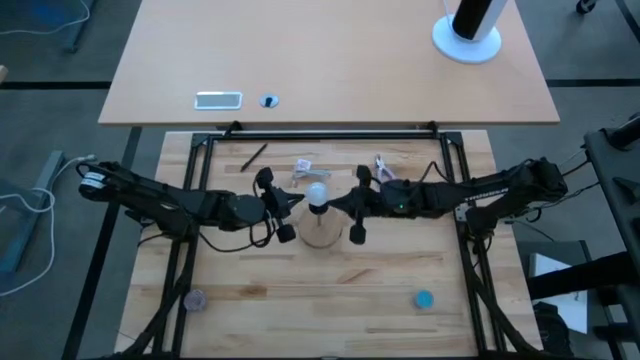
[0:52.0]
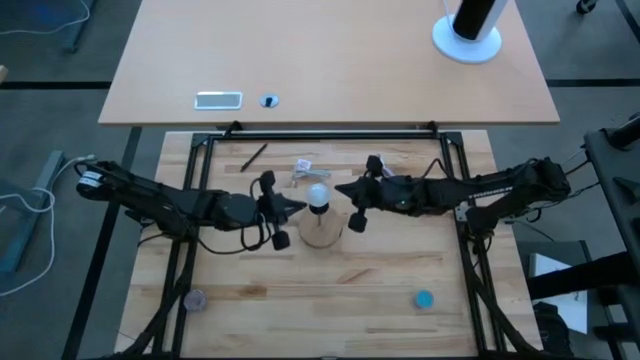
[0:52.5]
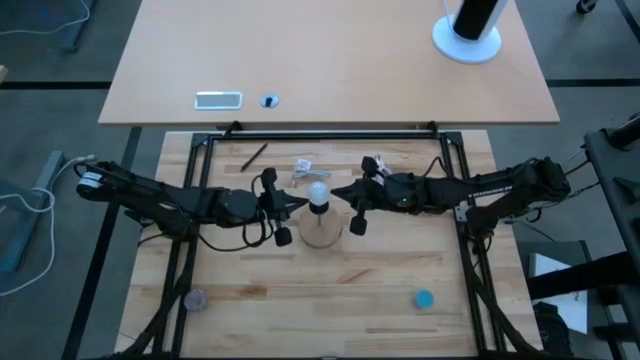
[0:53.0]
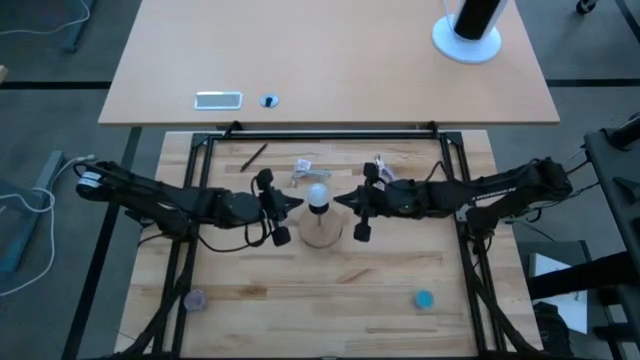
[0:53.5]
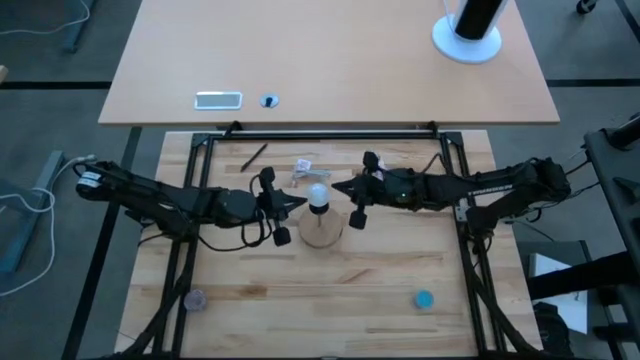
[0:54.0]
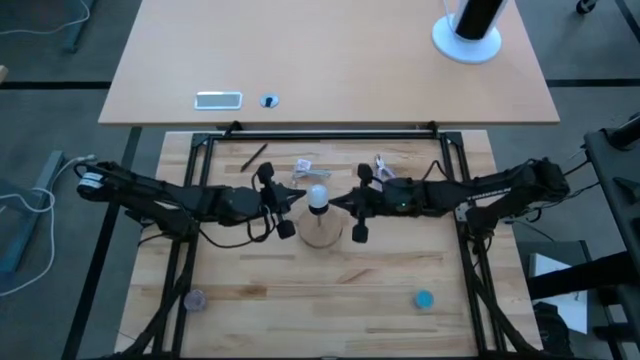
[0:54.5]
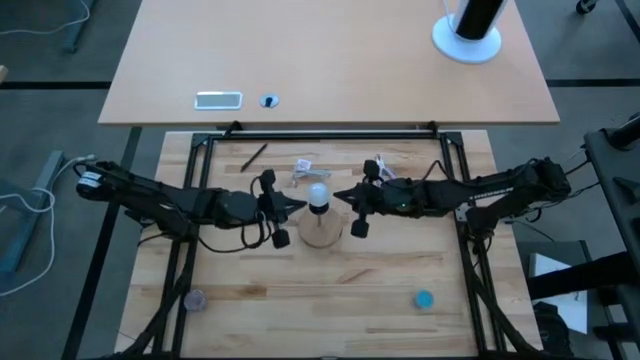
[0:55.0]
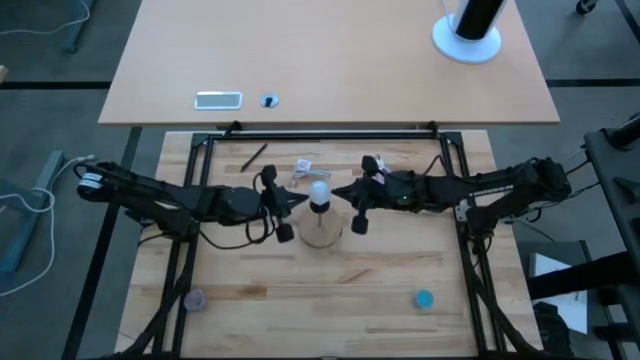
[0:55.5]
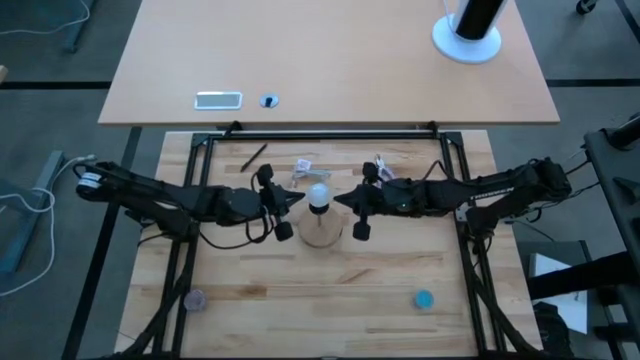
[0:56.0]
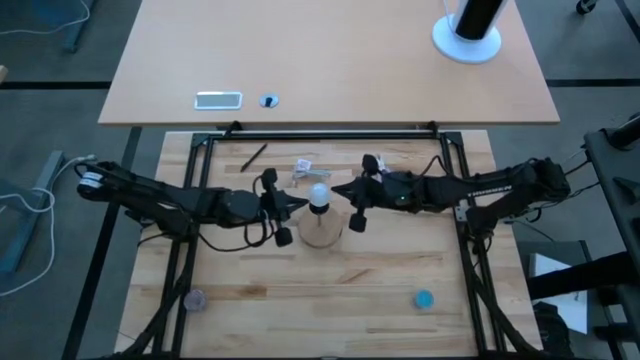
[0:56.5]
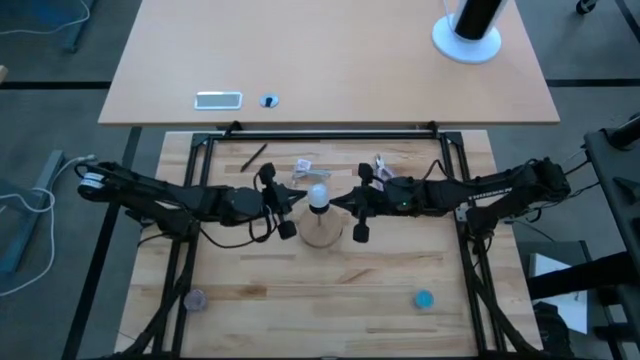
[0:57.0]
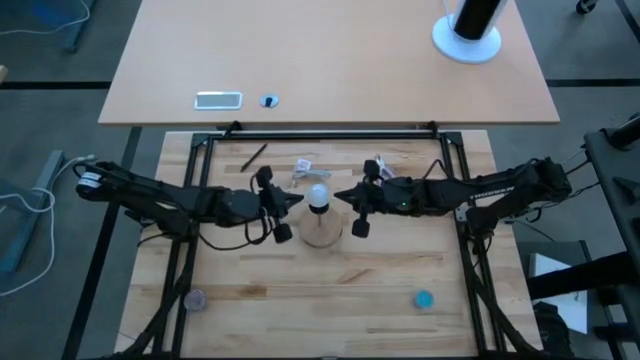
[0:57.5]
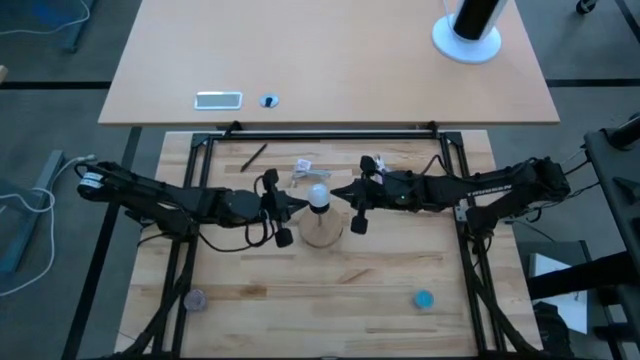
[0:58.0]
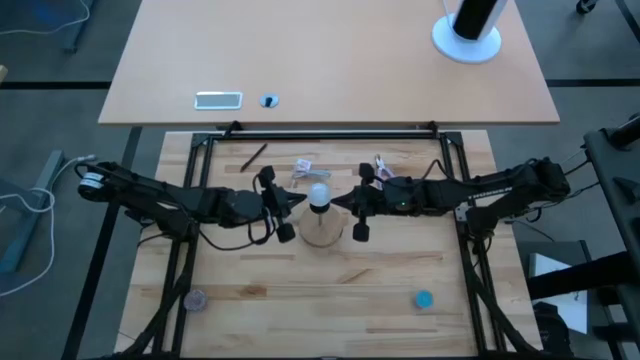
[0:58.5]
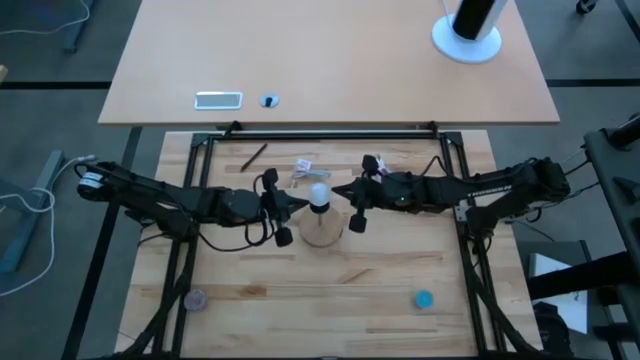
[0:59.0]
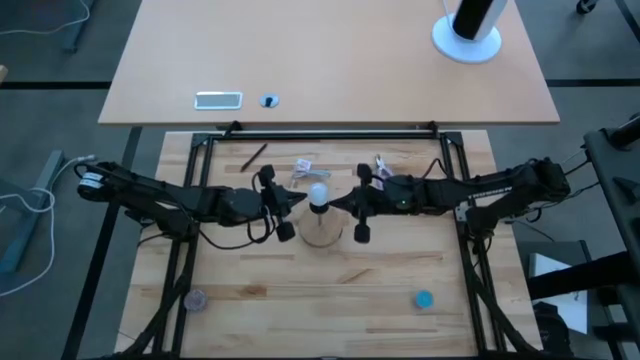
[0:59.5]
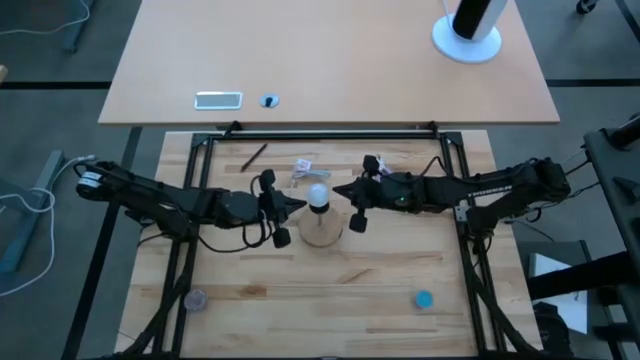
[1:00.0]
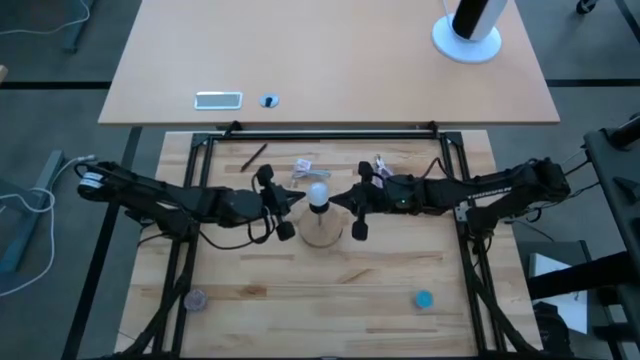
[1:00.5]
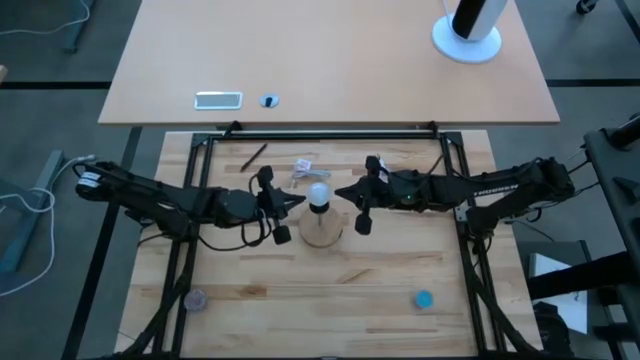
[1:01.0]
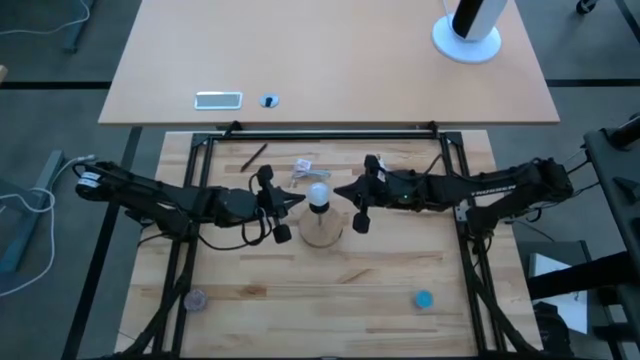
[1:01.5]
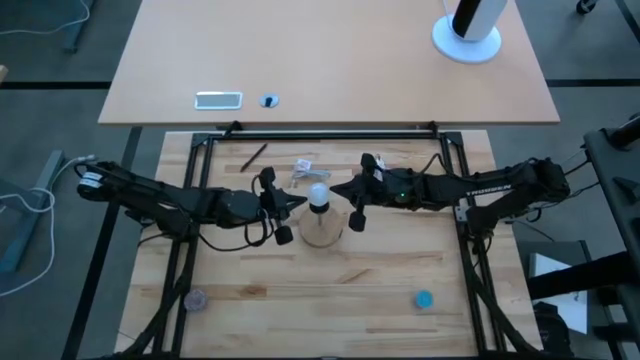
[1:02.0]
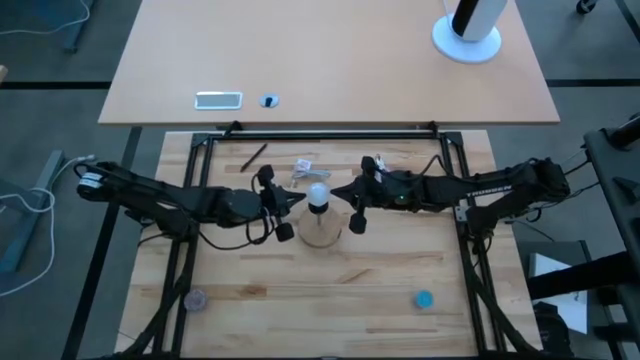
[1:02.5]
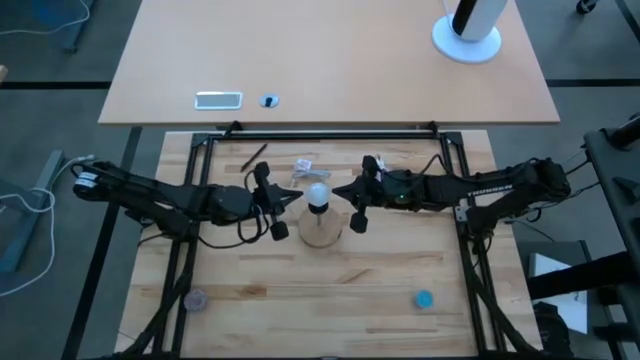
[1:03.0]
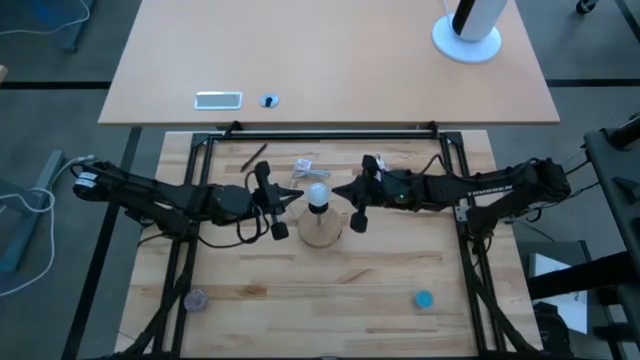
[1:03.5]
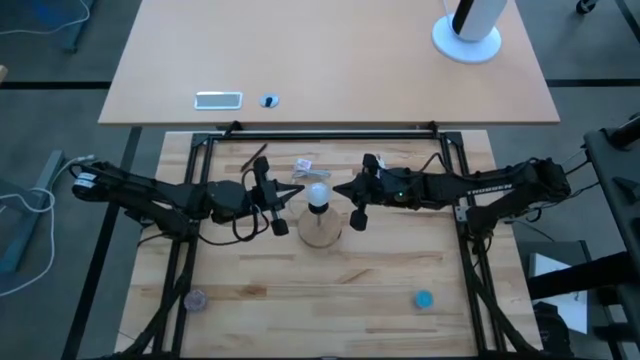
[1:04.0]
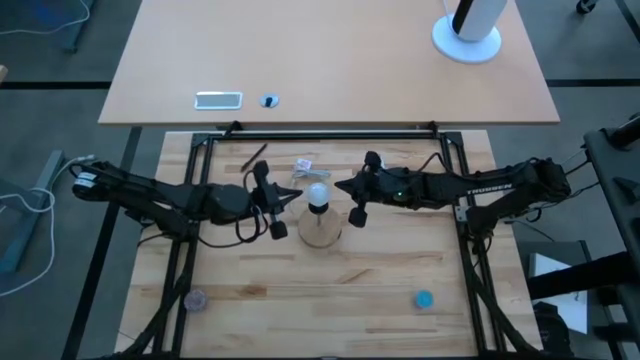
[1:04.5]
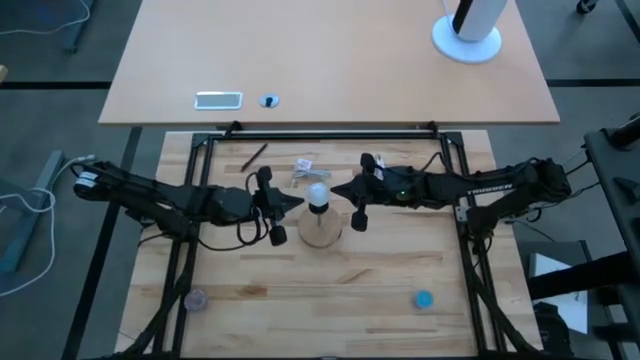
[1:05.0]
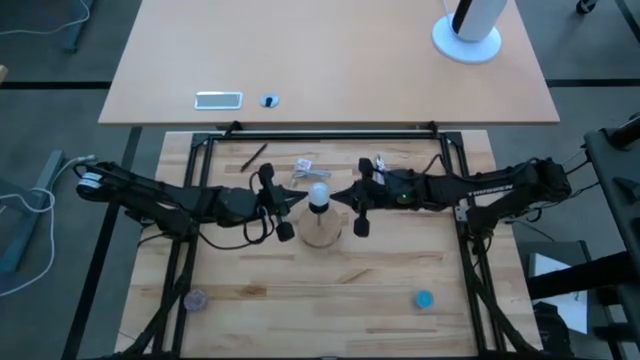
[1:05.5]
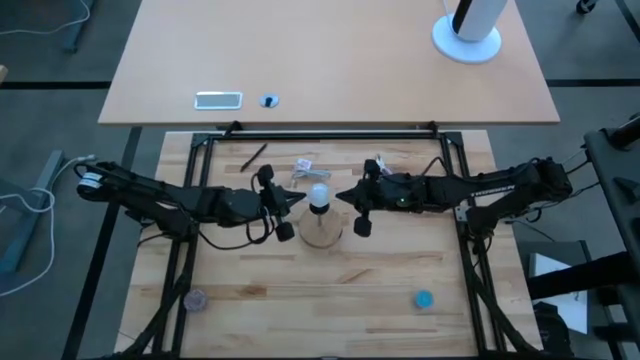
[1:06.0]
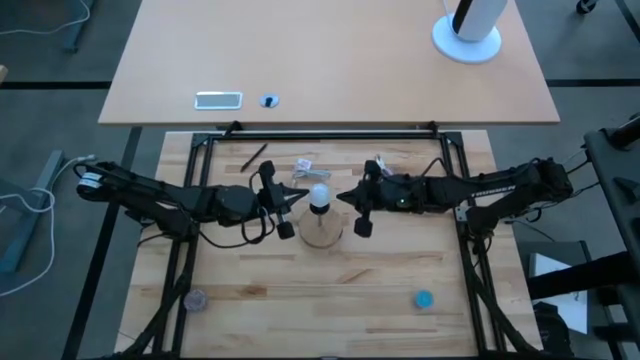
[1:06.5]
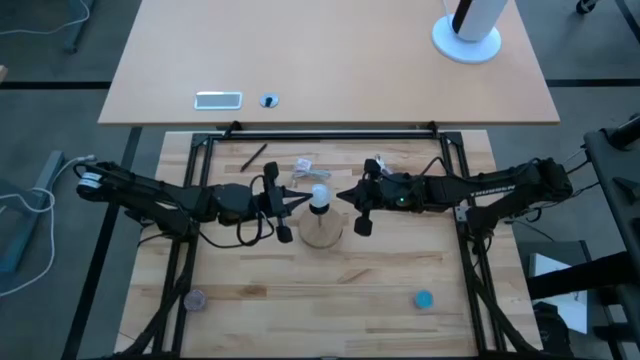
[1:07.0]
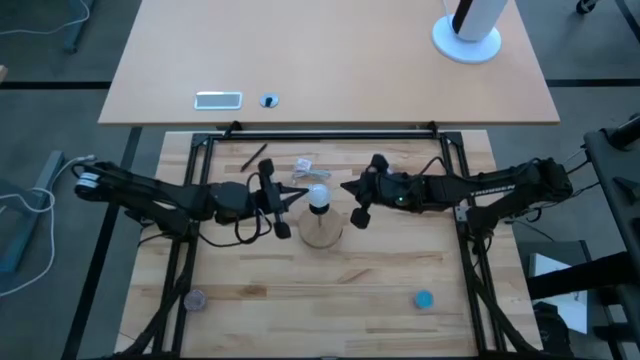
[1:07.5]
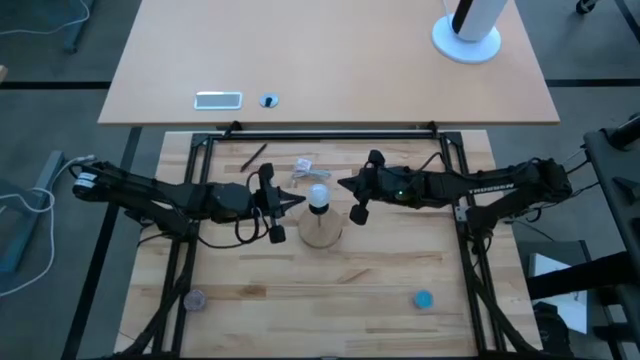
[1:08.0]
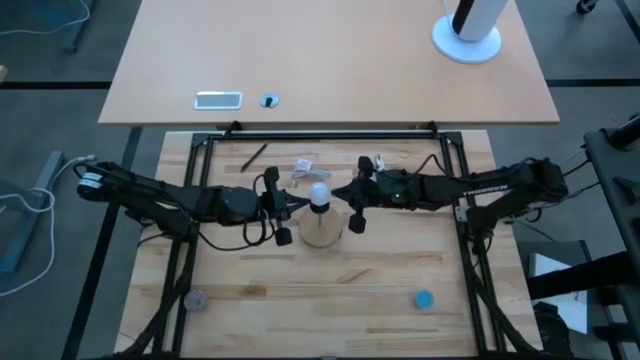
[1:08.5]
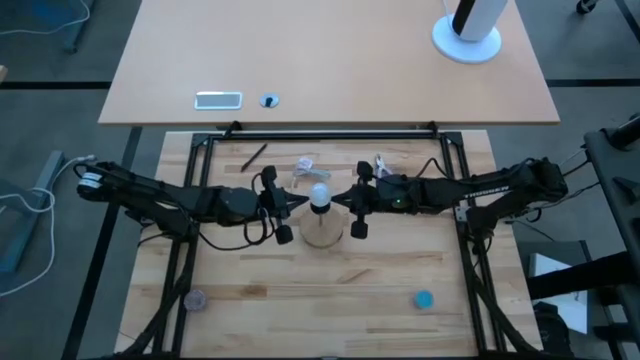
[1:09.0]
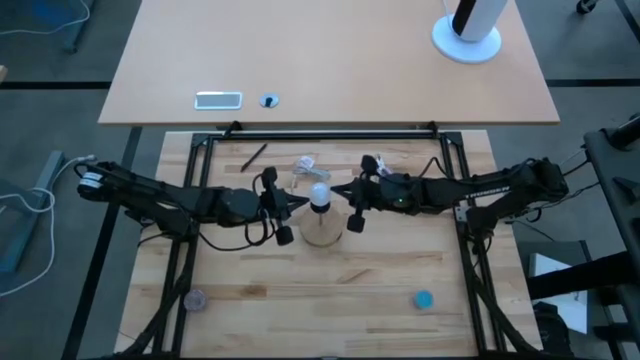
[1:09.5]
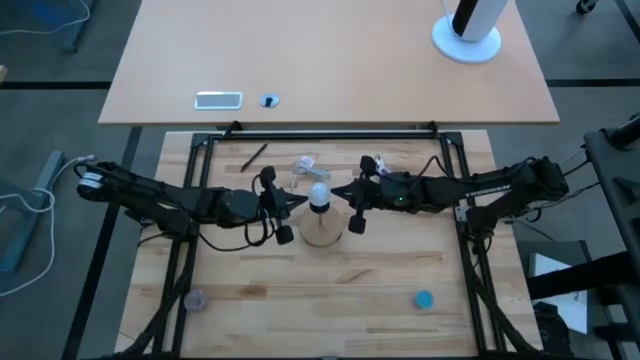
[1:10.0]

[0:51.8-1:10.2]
Task: Screw lightbulb
Insert the lightbulb into the brown lamp

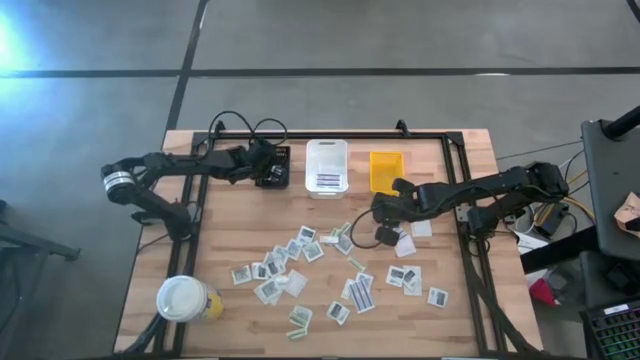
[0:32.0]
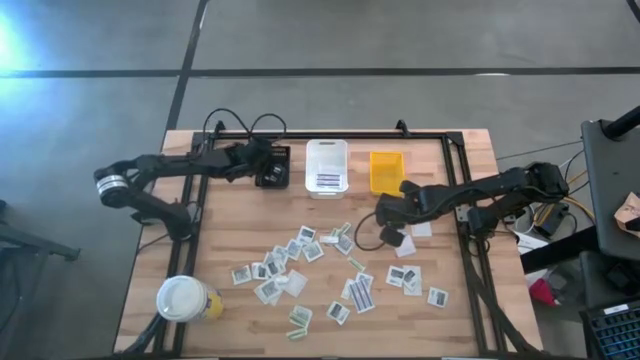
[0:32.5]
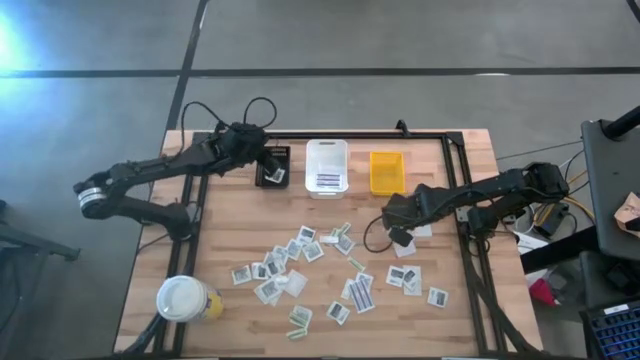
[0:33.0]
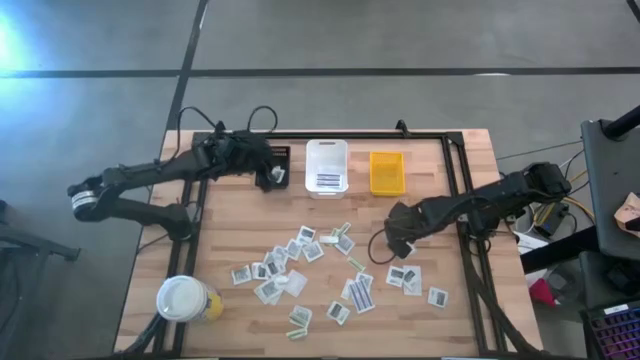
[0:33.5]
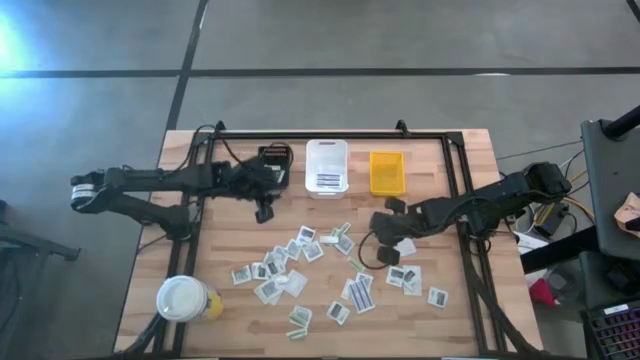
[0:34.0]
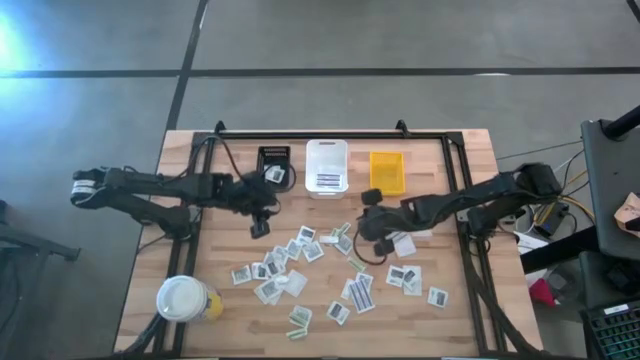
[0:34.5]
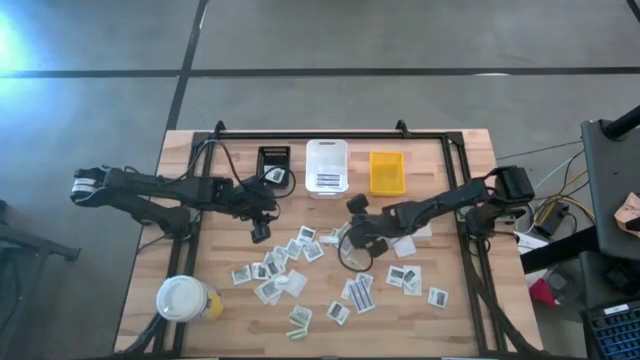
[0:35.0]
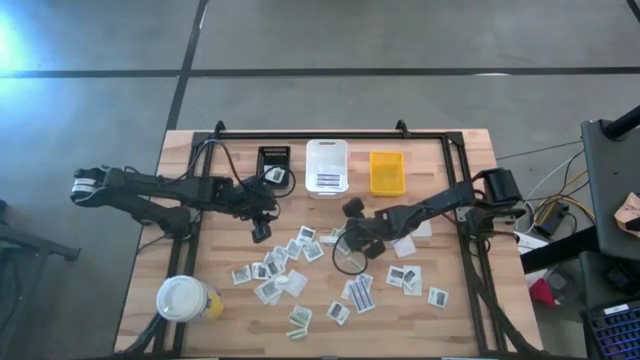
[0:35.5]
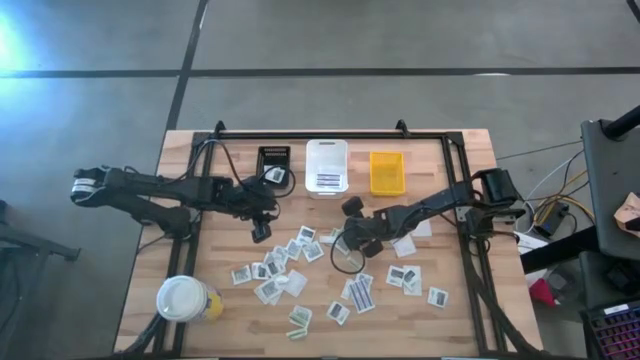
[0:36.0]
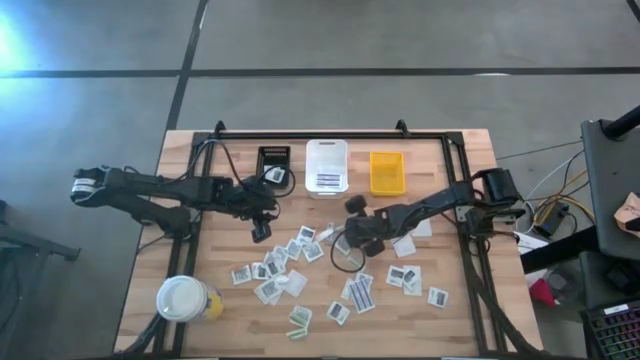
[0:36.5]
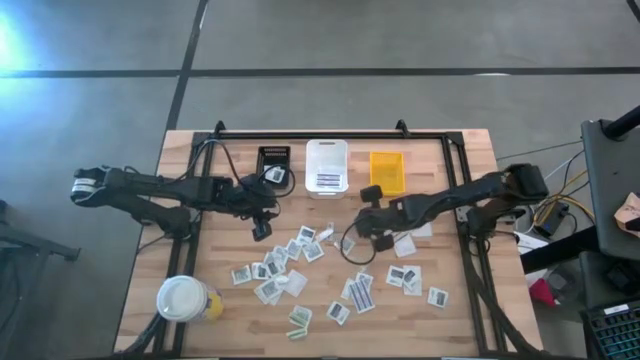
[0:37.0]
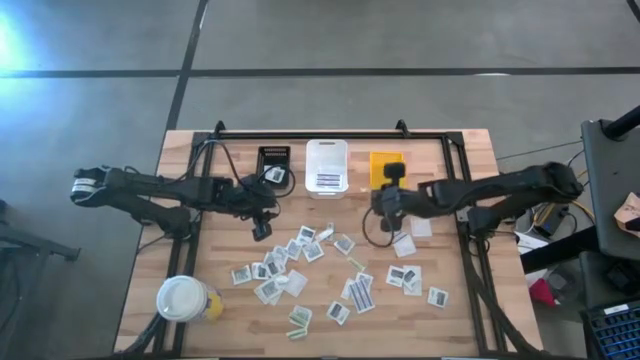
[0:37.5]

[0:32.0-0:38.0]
Task: Pick & Place First Aid Supplies
Put the green bandage into the yellow basket
